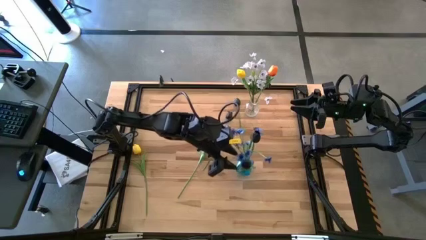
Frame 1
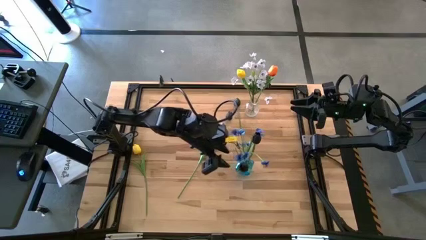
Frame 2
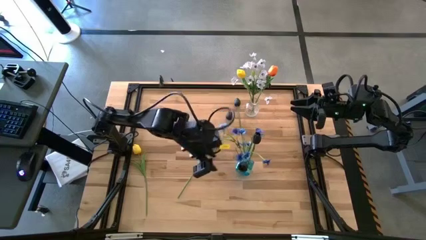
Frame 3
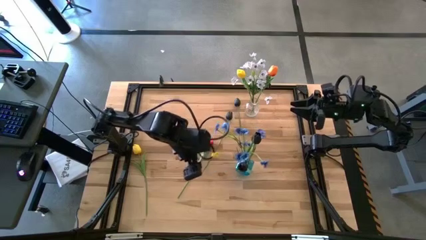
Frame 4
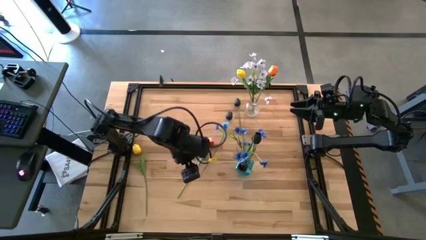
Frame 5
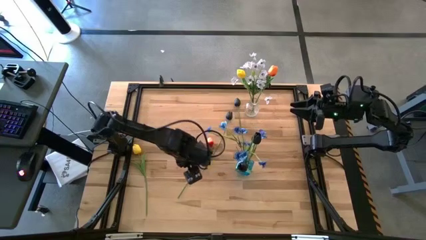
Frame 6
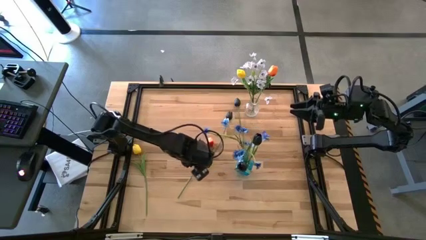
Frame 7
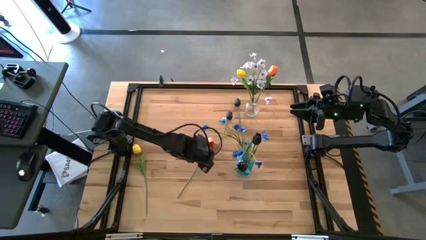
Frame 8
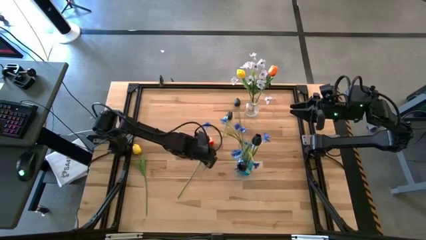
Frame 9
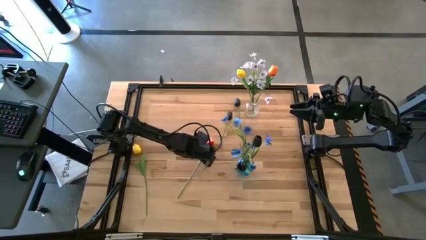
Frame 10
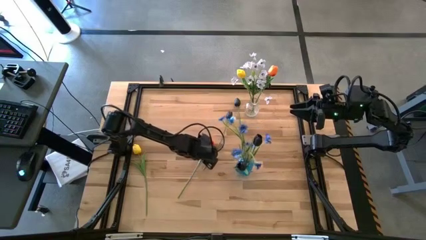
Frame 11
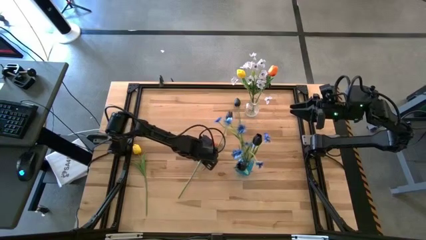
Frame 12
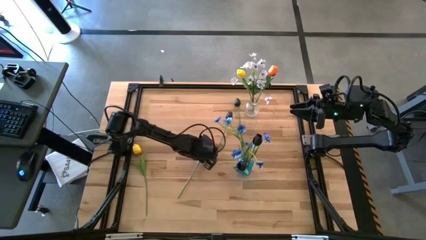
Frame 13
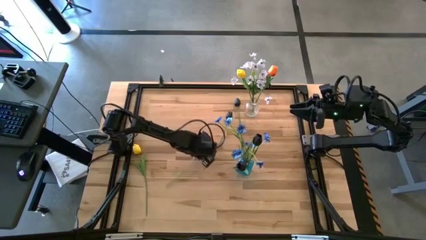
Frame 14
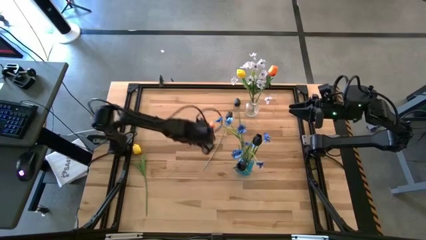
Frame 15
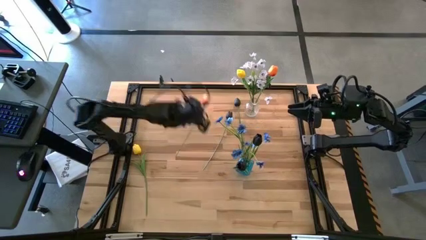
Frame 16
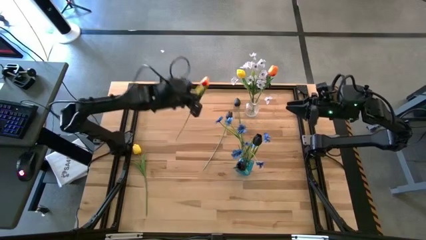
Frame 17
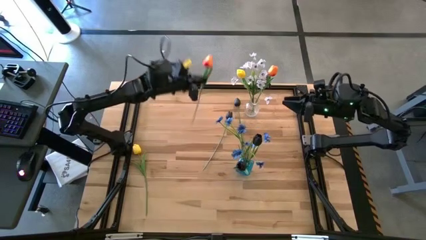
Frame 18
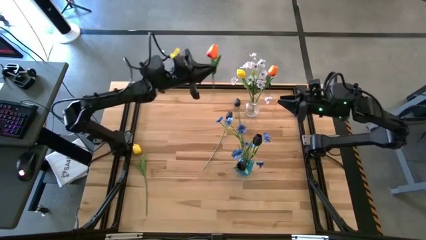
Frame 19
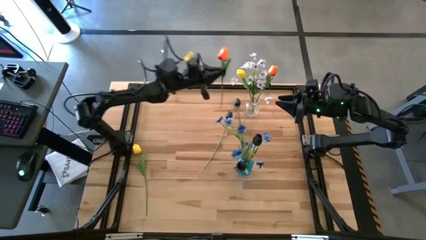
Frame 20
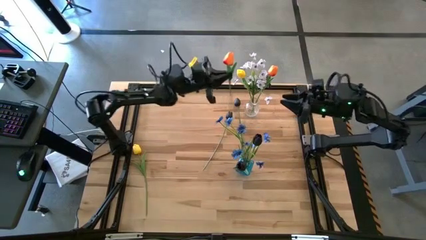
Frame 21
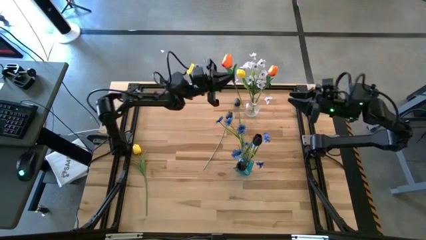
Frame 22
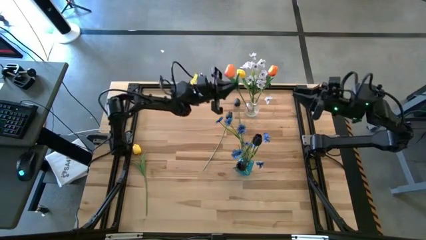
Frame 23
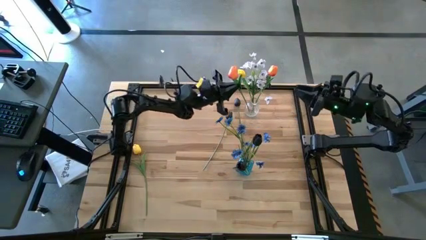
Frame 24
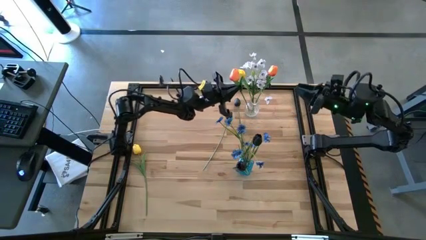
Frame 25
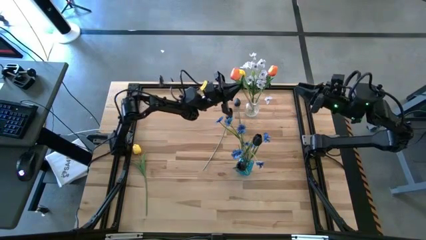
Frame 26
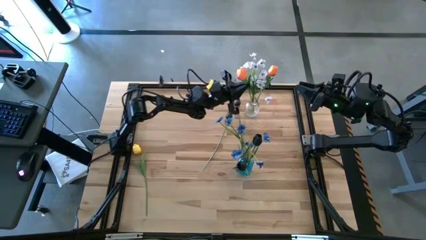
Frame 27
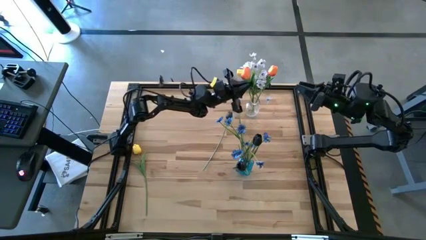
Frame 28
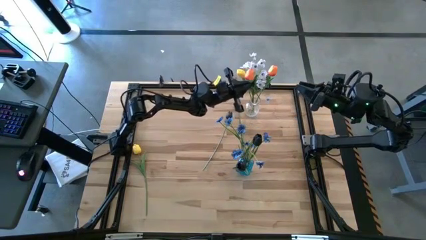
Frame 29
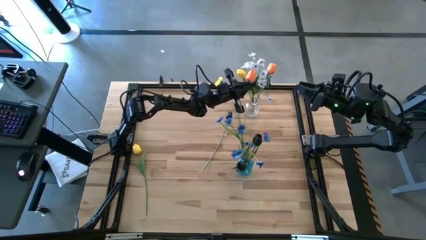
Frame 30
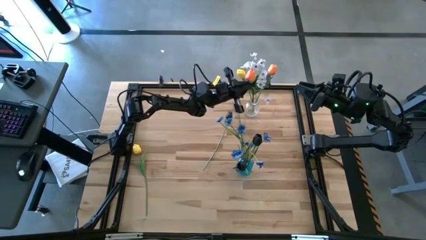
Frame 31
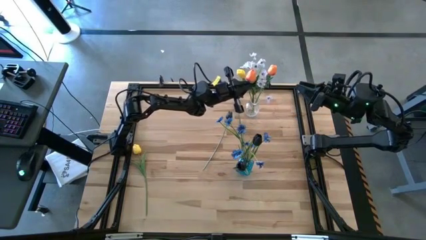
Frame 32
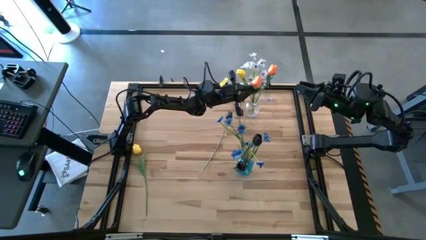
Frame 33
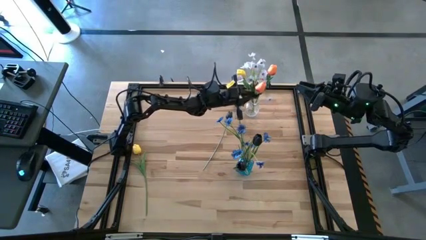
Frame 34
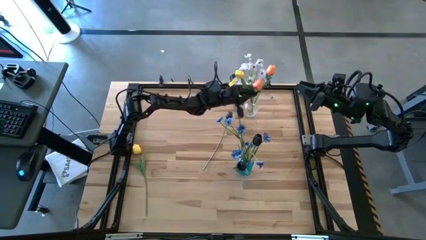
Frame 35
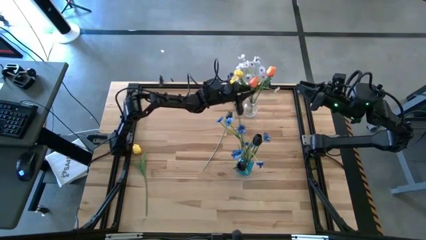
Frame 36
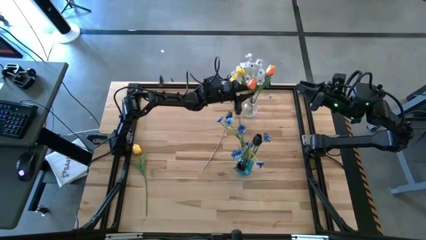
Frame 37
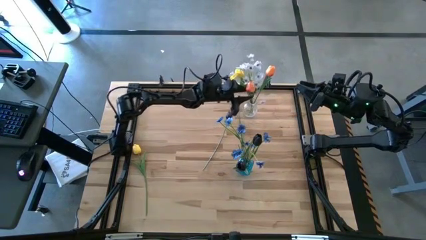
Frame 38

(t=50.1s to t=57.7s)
Task: Sort flowers into vase by color
Put the orange flower into the transparent vase

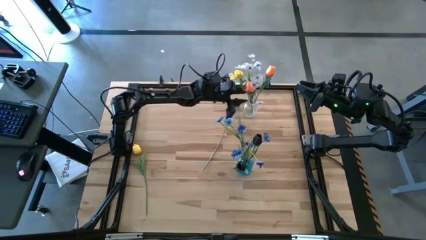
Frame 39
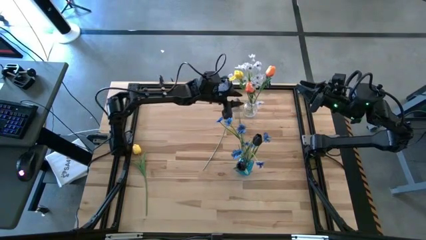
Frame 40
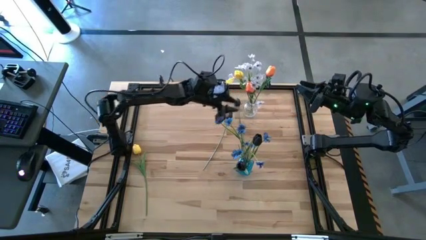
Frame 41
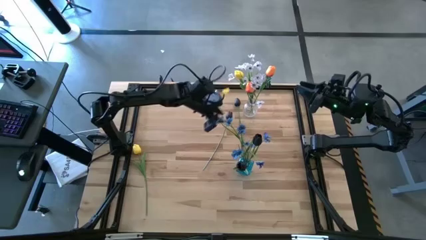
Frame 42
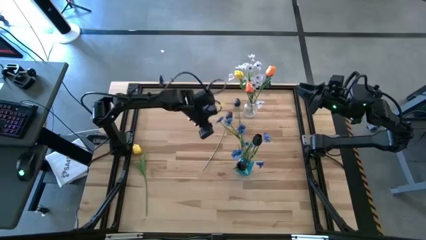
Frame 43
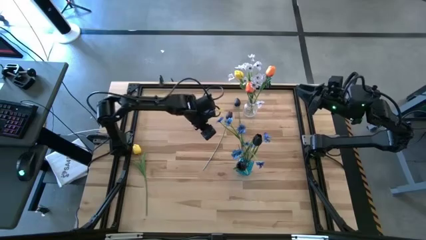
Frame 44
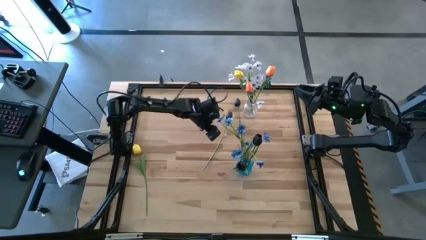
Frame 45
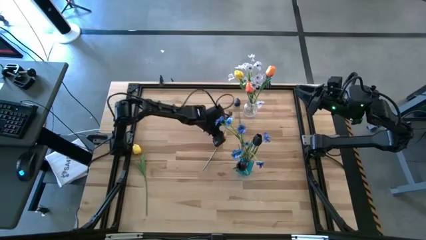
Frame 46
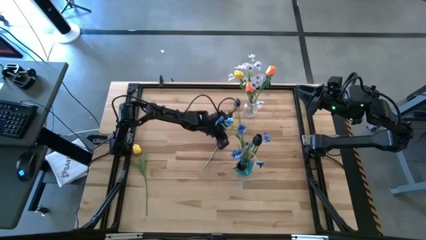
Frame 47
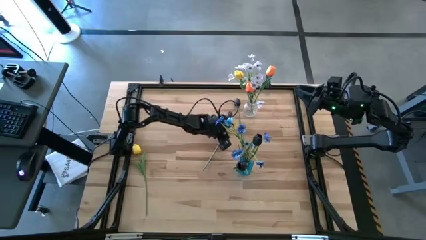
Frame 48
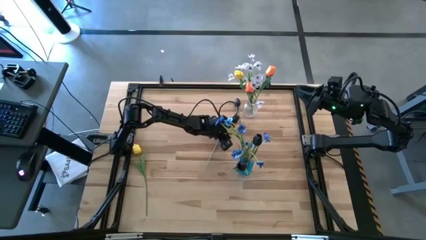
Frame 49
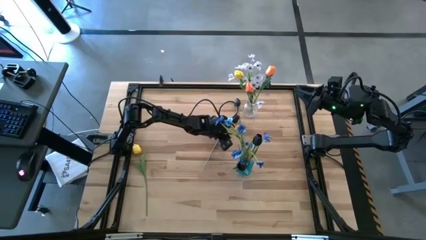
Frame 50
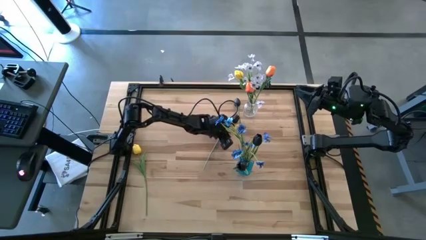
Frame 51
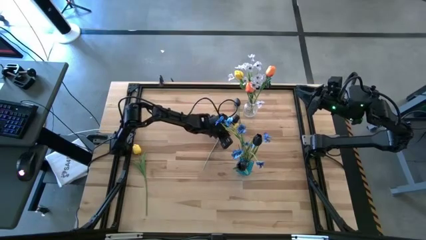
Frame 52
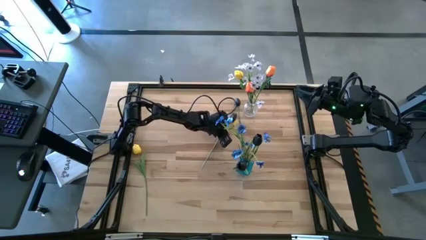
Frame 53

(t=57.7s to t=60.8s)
Put the black flower into the blue vase

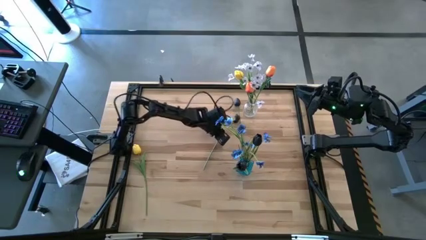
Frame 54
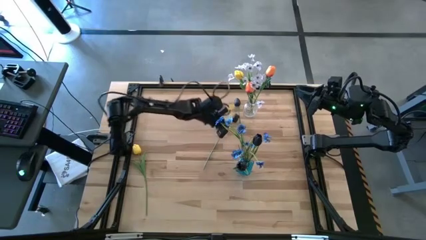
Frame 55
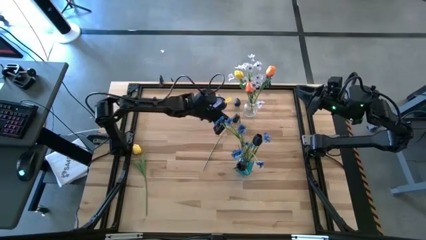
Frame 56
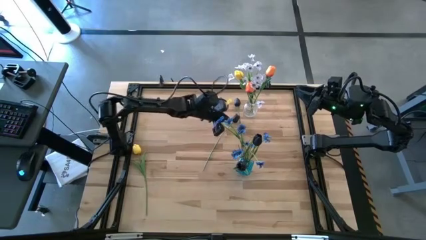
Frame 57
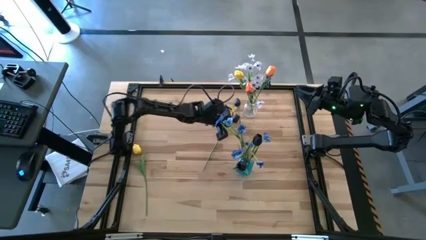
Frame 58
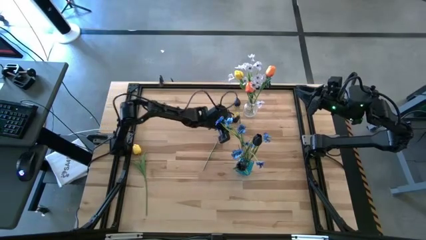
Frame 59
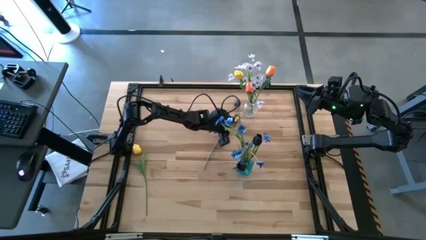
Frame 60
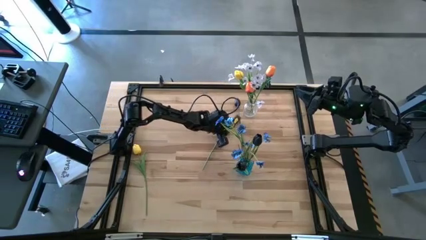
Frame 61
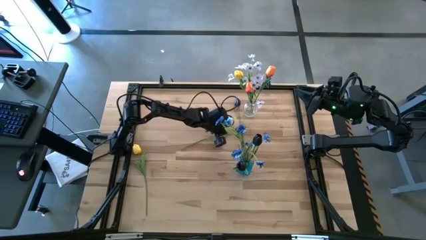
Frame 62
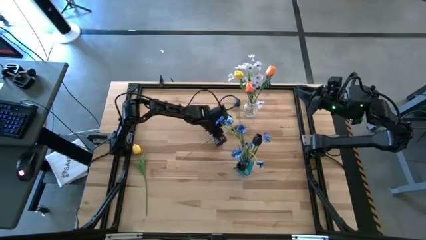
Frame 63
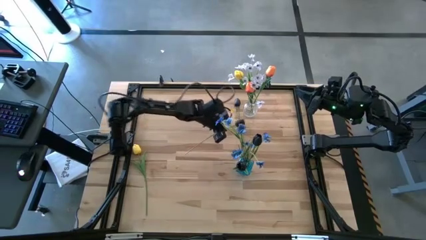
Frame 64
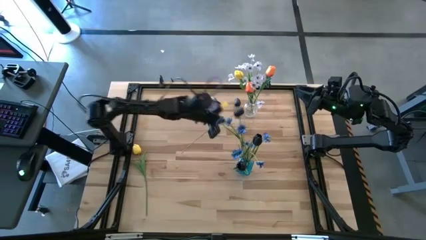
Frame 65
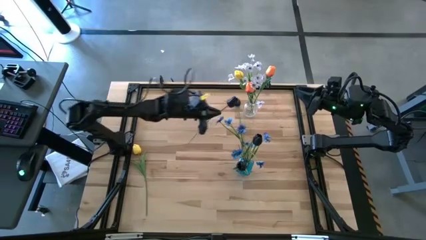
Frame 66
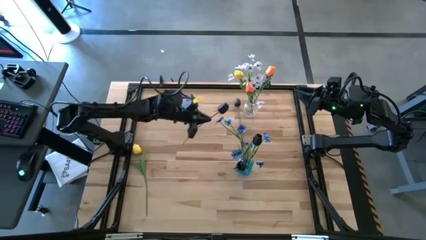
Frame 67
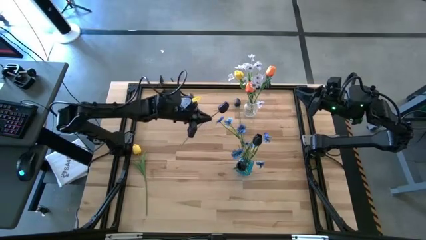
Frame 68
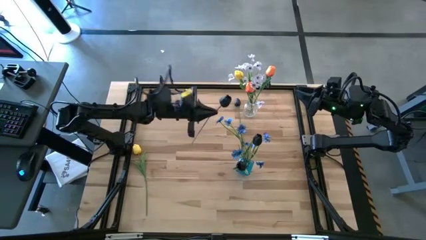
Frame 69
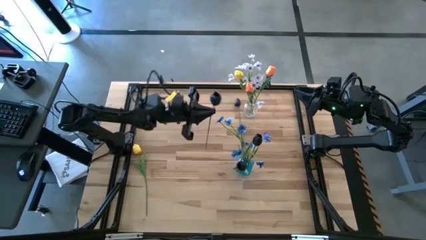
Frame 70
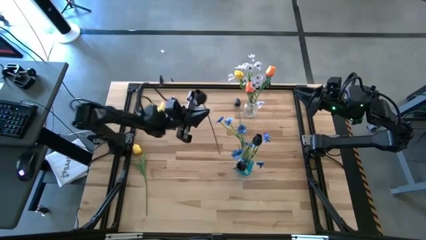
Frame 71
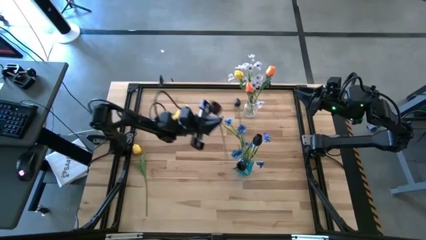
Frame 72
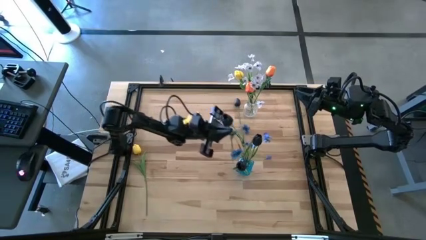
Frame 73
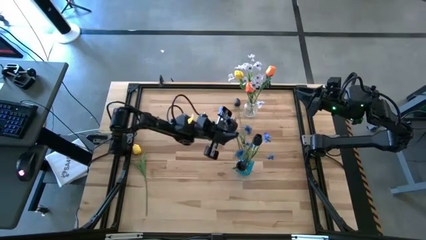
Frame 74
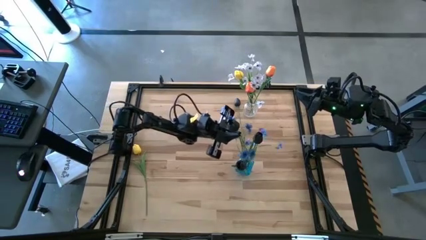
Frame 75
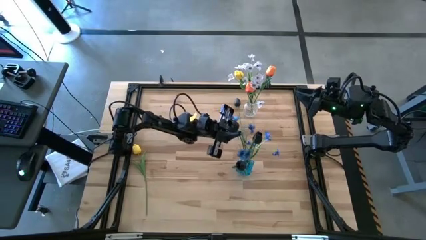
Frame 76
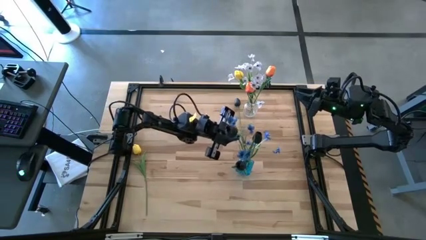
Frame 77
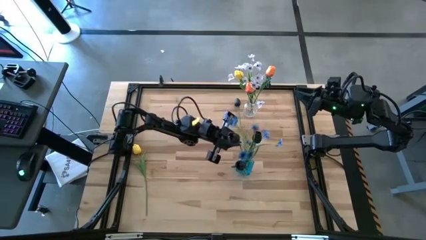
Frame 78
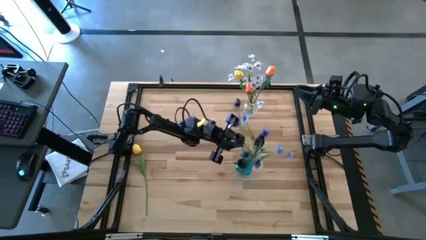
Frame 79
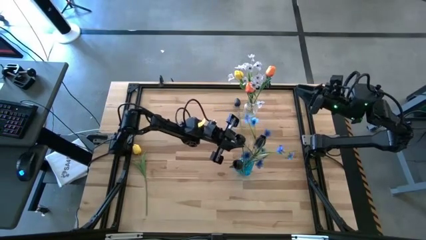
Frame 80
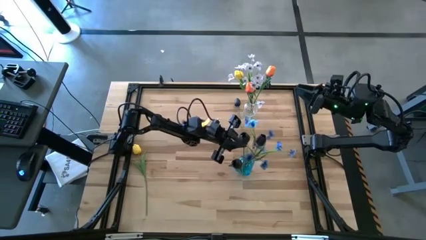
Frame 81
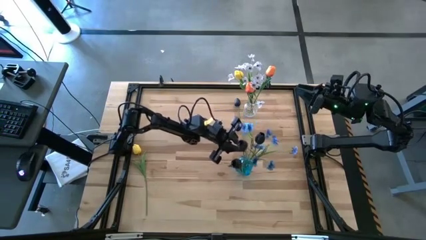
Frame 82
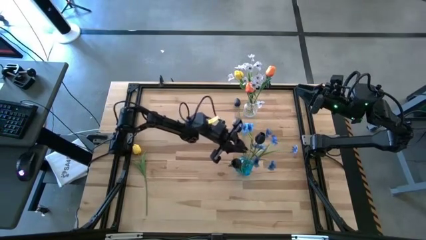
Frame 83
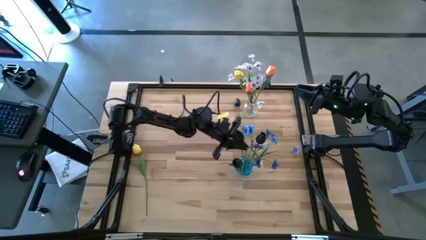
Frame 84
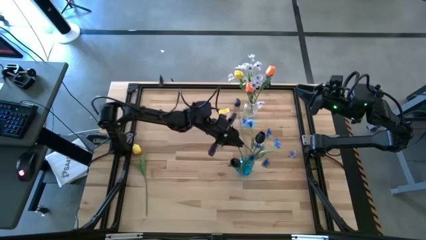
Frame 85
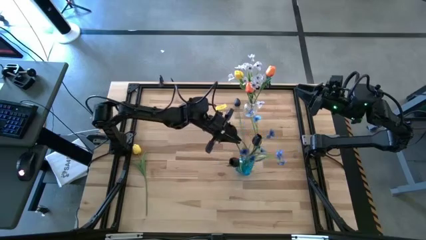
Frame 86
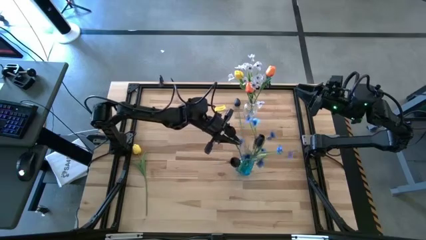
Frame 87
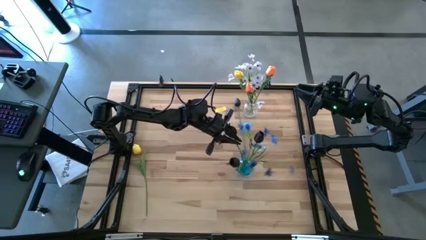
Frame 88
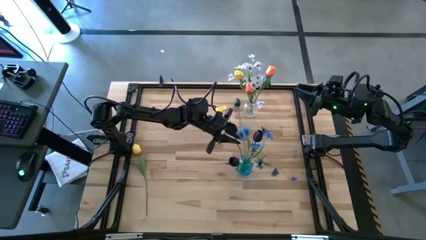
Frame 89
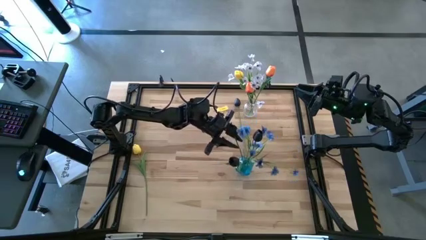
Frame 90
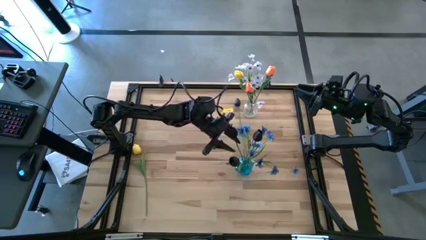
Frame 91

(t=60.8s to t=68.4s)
Put the black flower into the blue vase
